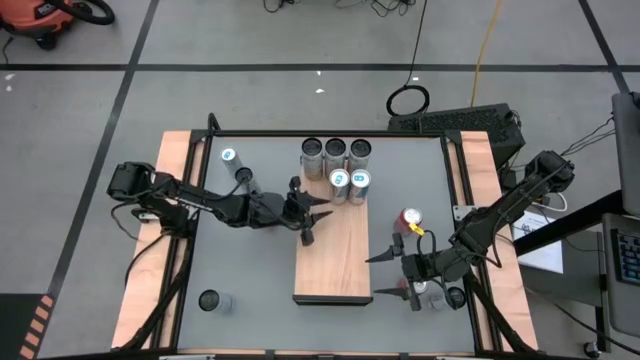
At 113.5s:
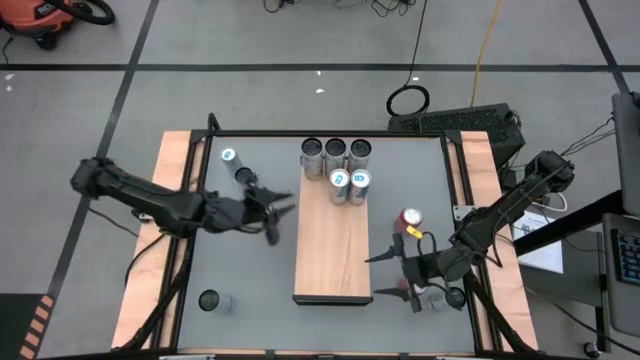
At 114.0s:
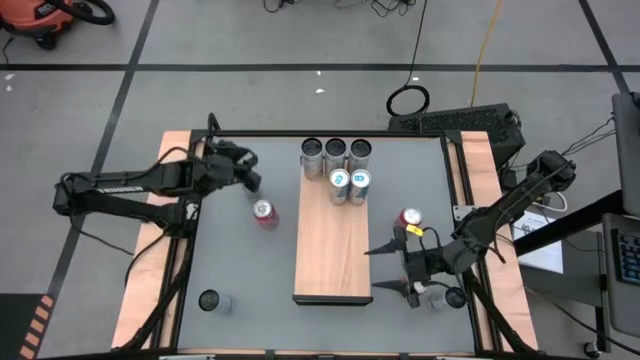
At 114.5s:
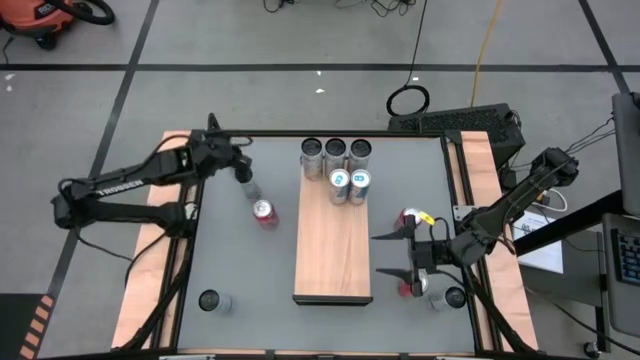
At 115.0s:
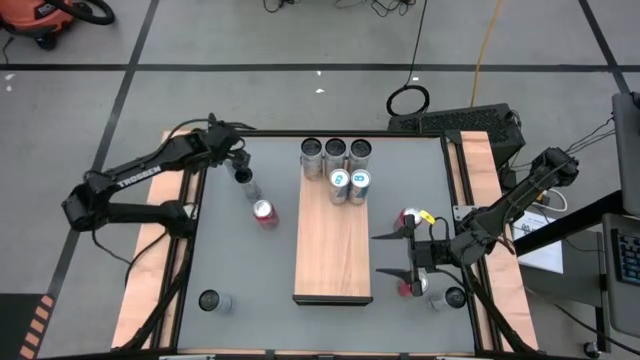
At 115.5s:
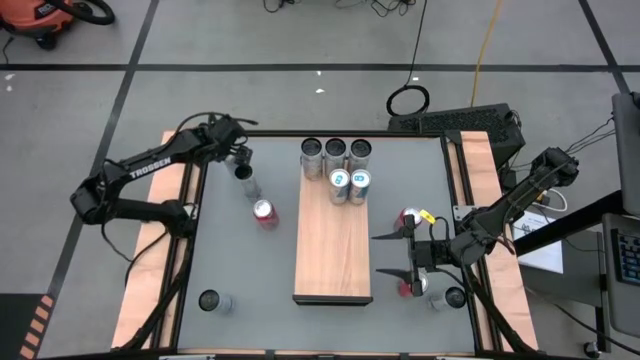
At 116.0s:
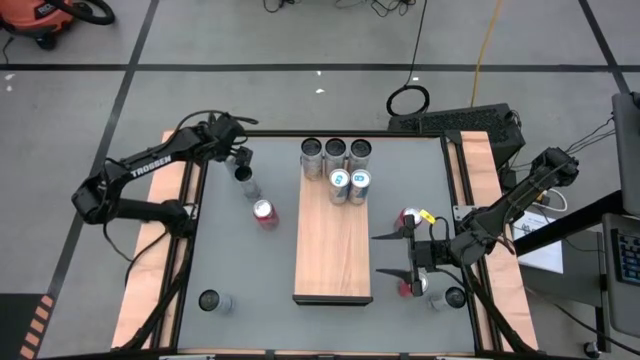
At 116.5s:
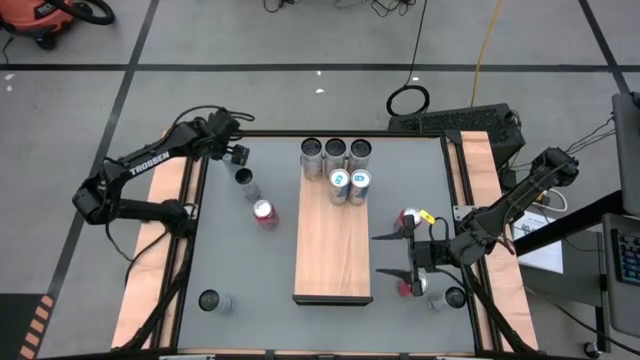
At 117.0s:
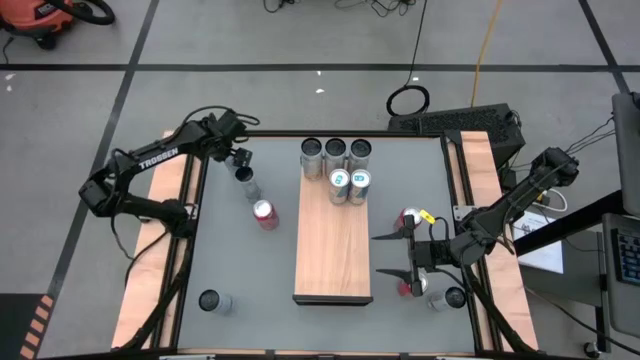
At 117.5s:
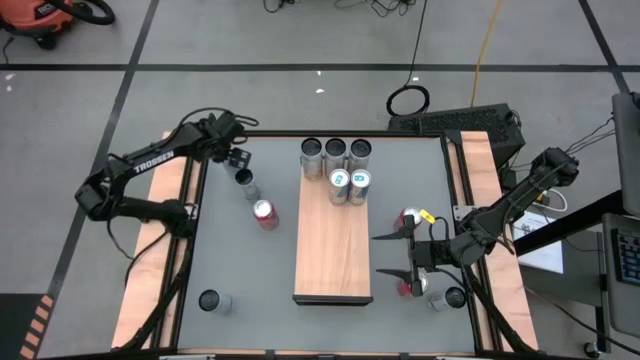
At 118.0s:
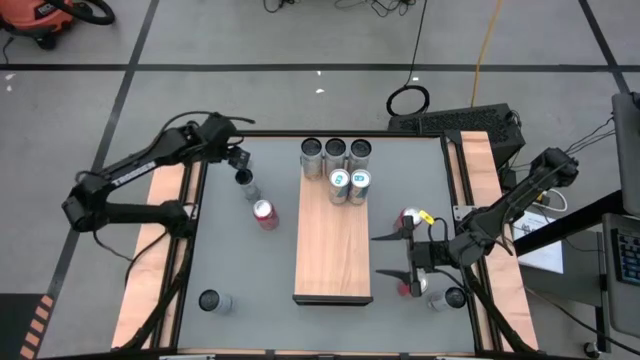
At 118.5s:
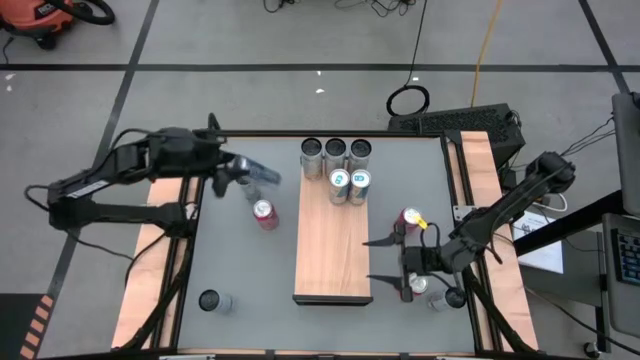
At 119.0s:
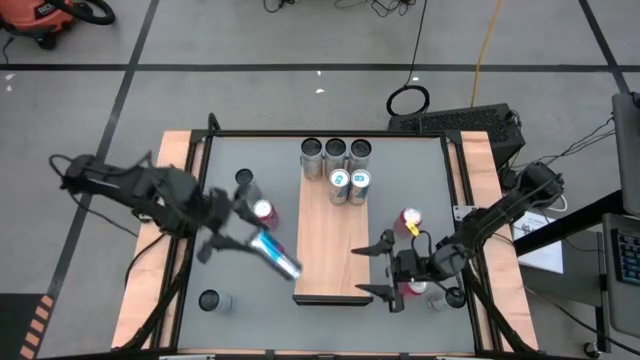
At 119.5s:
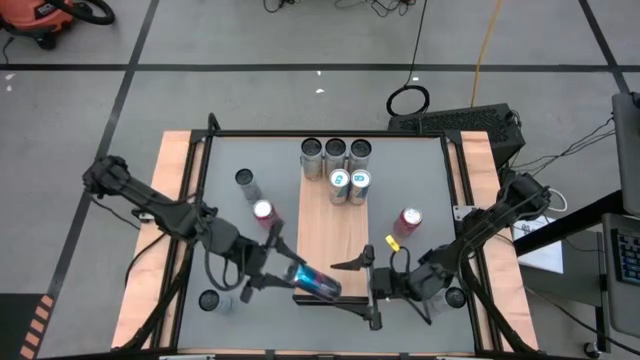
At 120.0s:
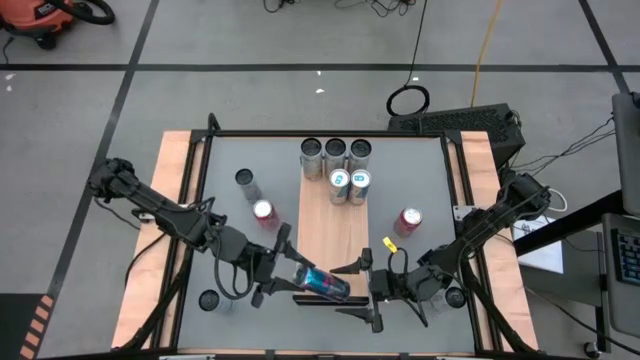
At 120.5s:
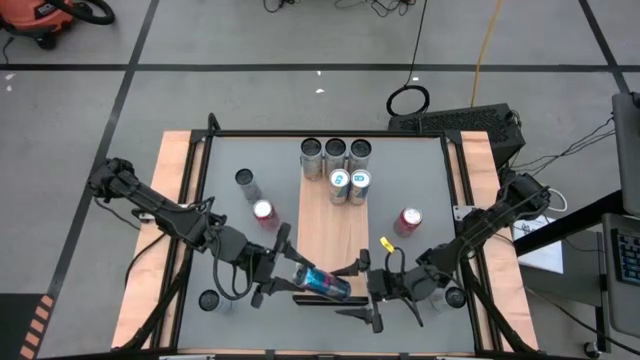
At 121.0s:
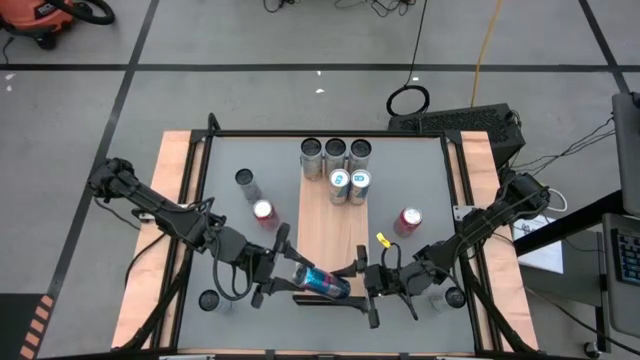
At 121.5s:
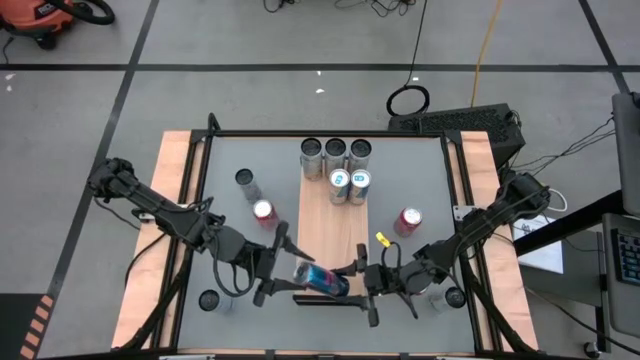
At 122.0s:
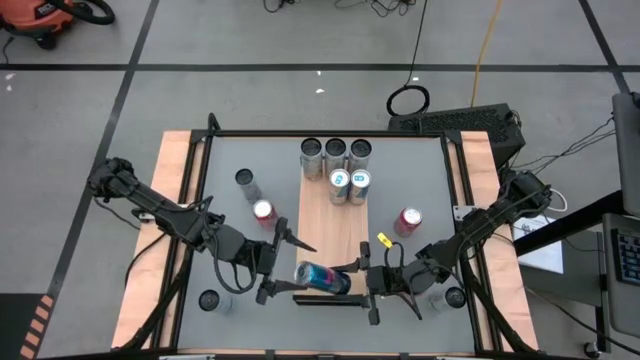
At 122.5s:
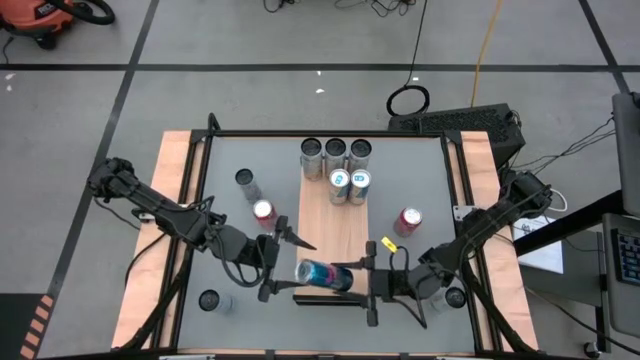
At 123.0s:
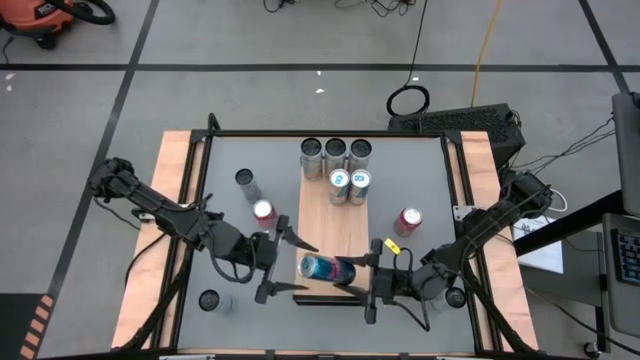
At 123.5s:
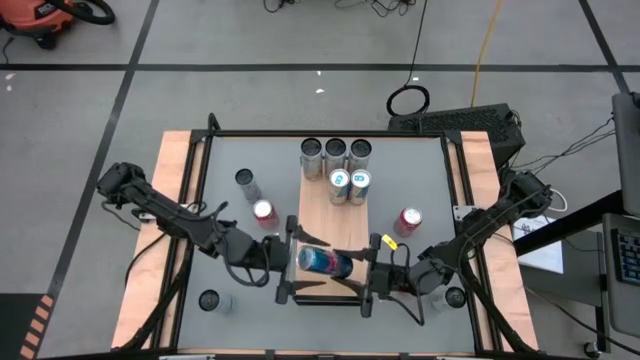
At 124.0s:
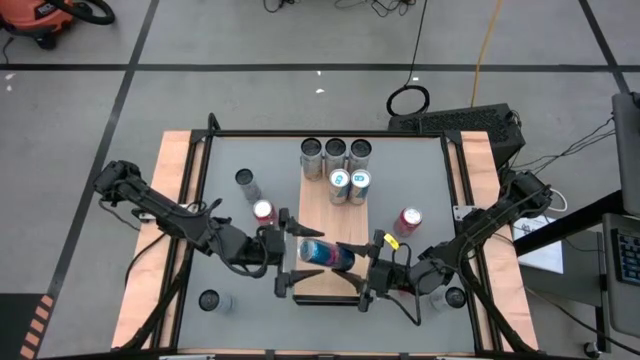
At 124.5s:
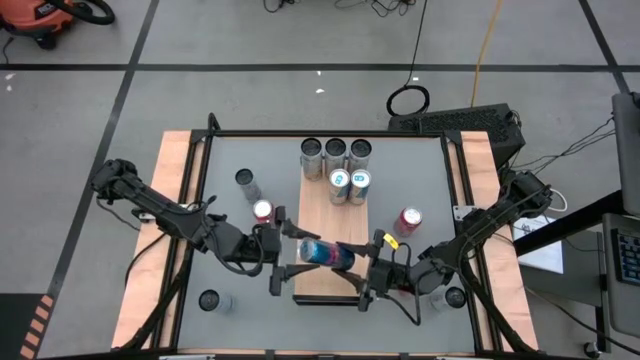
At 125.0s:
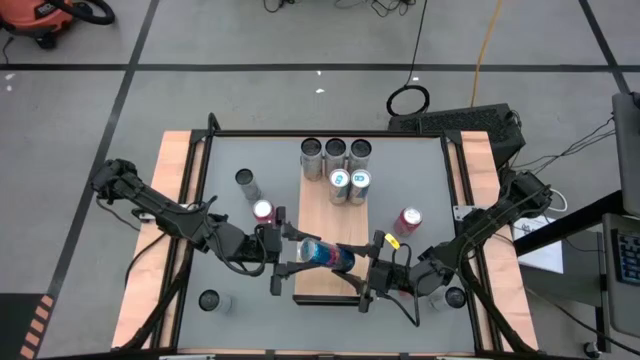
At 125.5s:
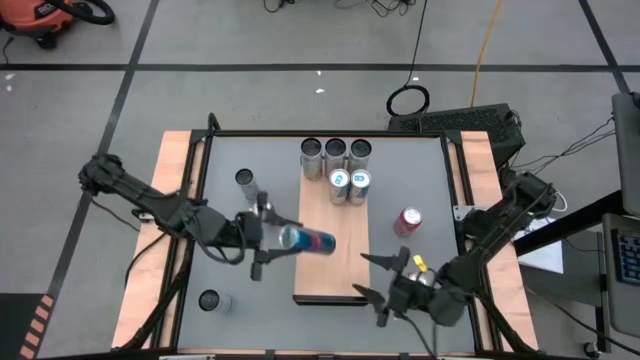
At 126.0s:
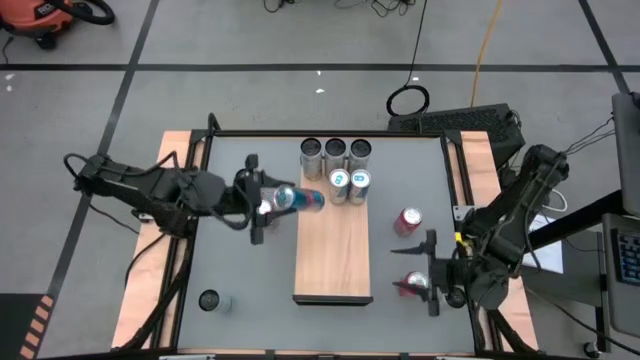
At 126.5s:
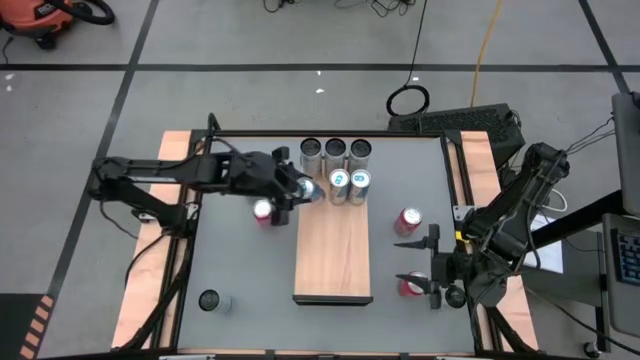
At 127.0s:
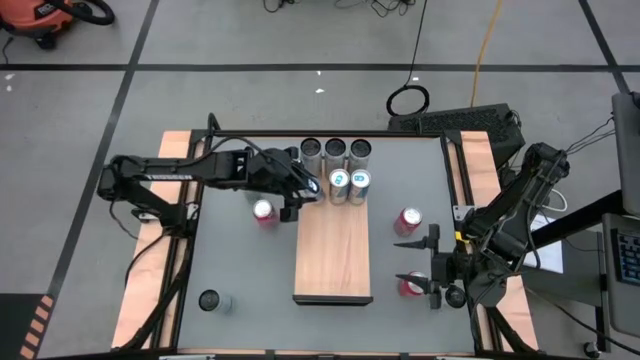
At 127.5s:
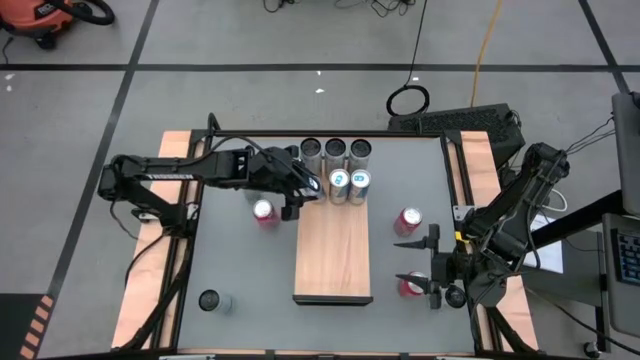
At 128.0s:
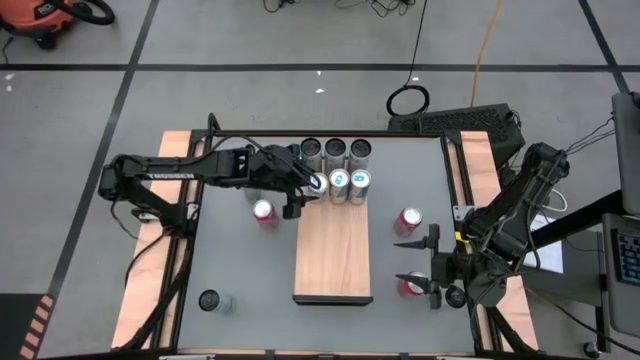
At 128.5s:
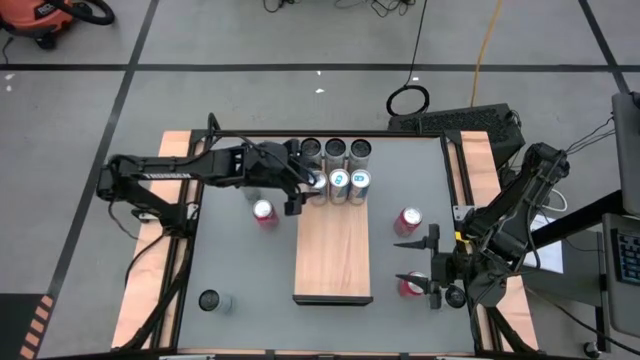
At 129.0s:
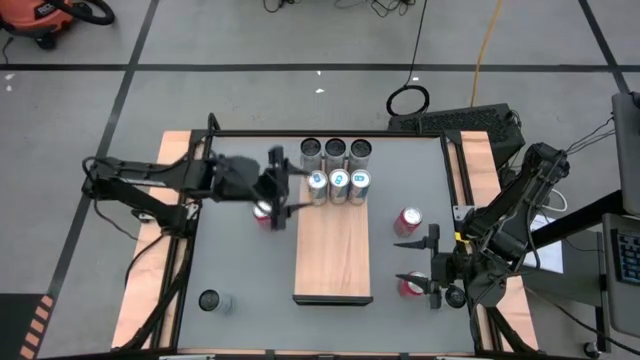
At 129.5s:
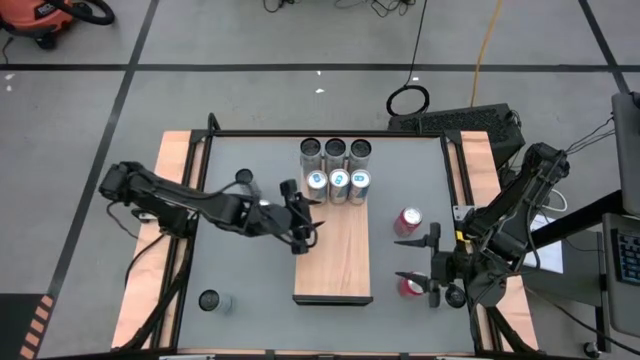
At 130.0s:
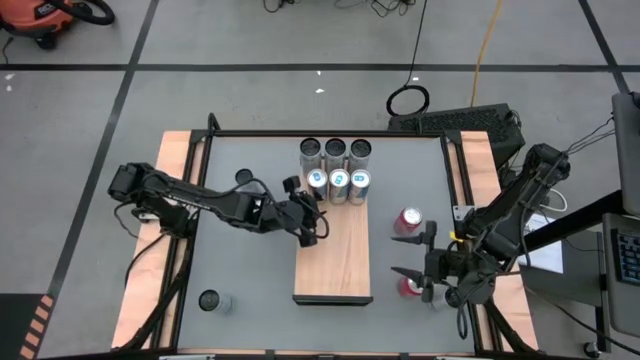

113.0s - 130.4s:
Task: Place canned beverage on shelf
Put the blue soda can on the shelf aligned with the other blue soda cans

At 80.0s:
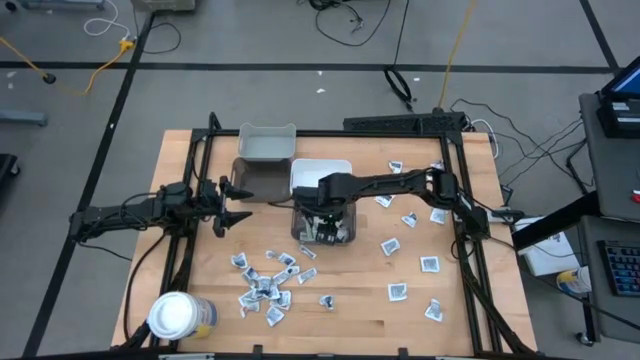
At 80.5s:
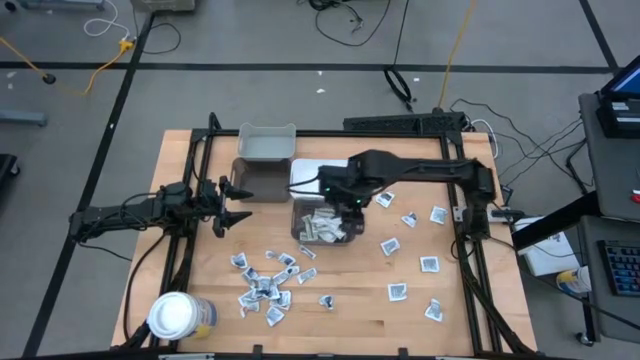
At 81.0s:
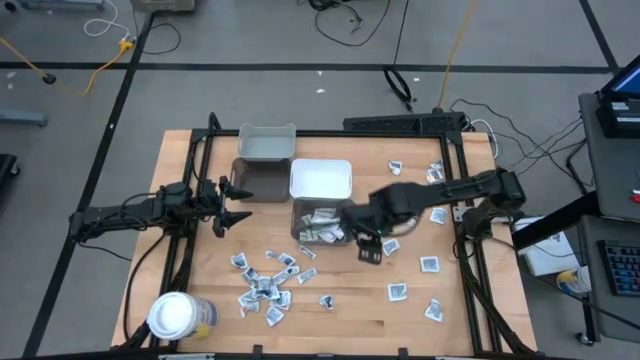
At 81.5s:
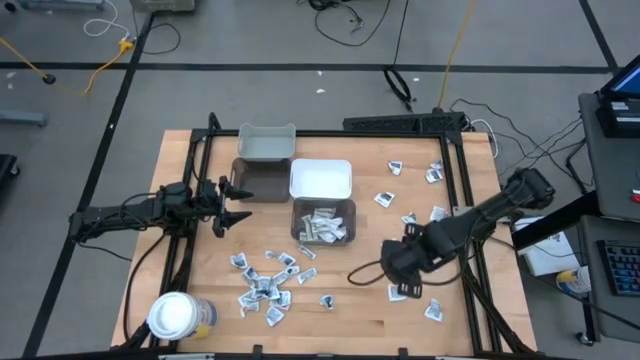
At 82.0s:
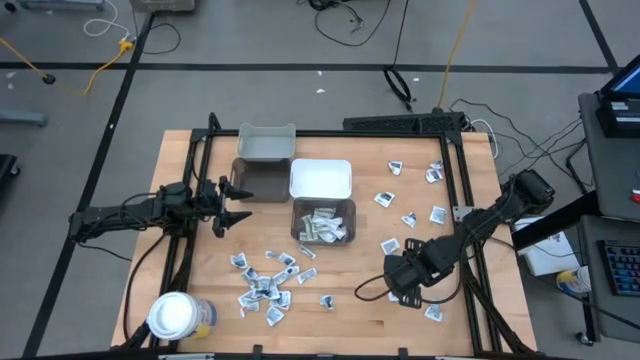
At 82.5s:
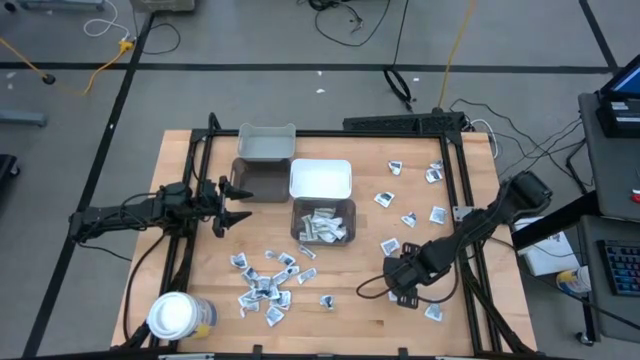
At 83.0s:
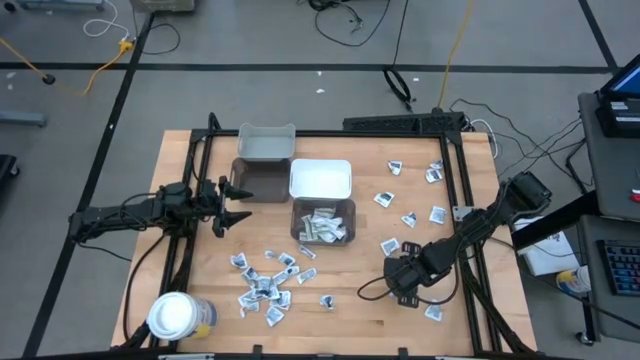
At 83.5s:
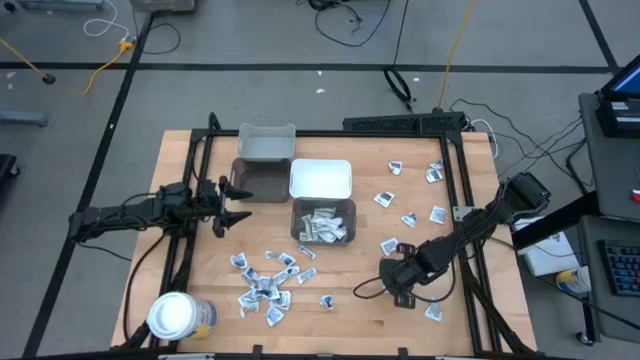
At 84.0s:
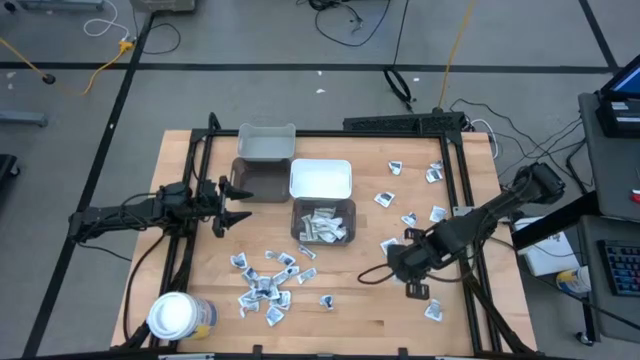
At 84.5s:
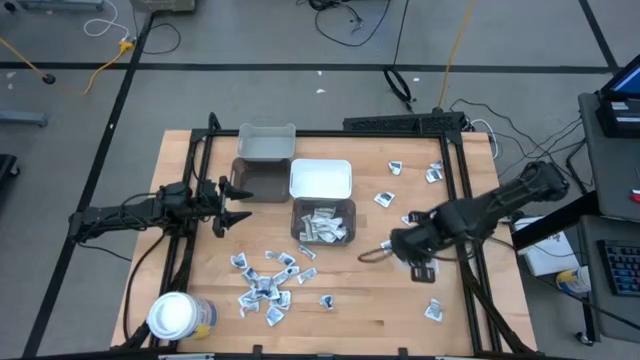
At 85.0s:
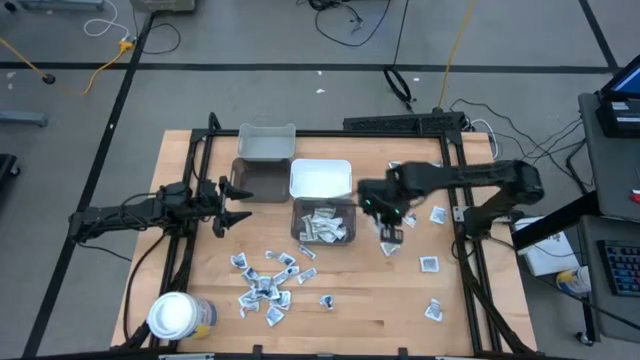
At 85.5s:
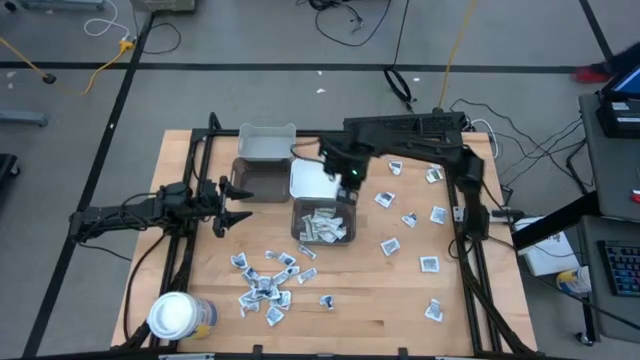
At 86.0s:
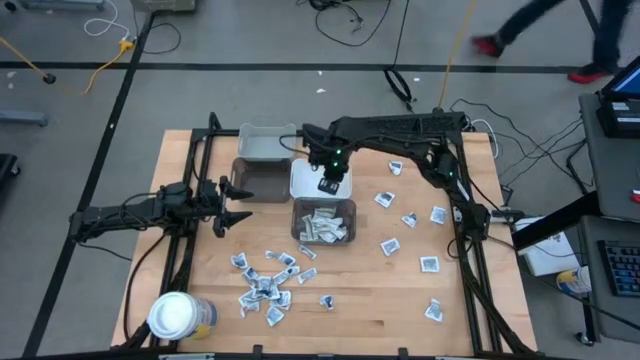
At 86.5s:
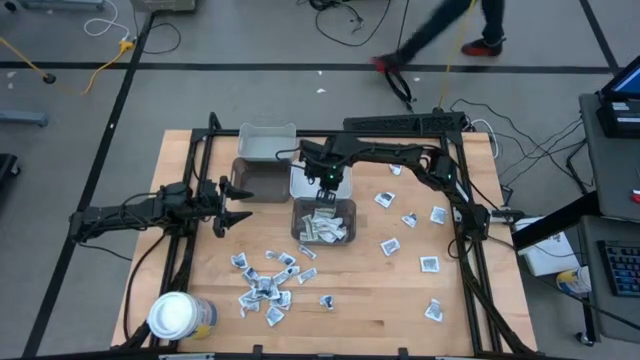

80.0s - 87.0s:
Task: Pick & Place First Aid Supplies
Put the gray towelette pack into the white bin
